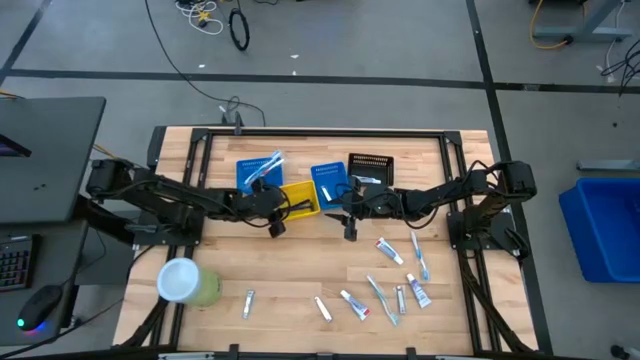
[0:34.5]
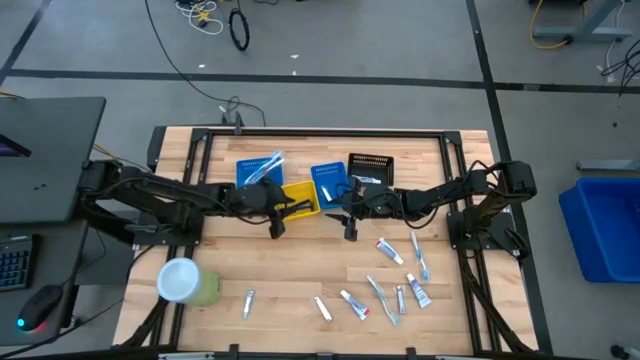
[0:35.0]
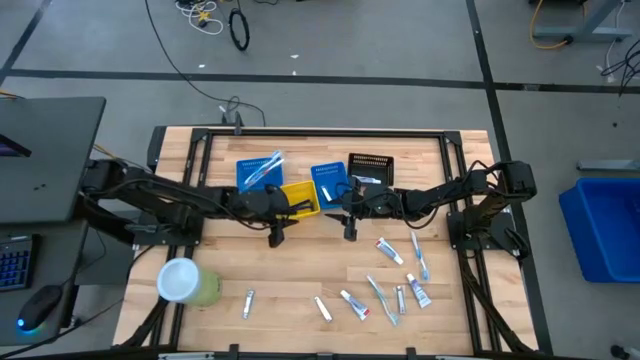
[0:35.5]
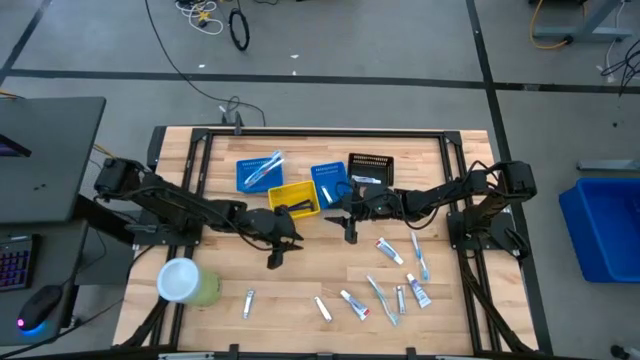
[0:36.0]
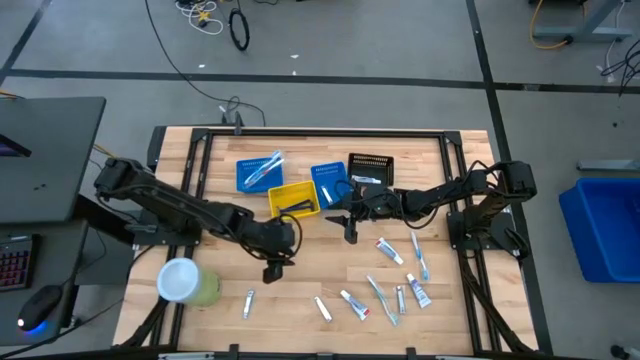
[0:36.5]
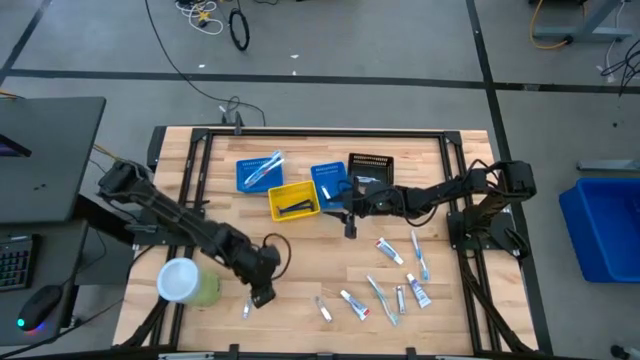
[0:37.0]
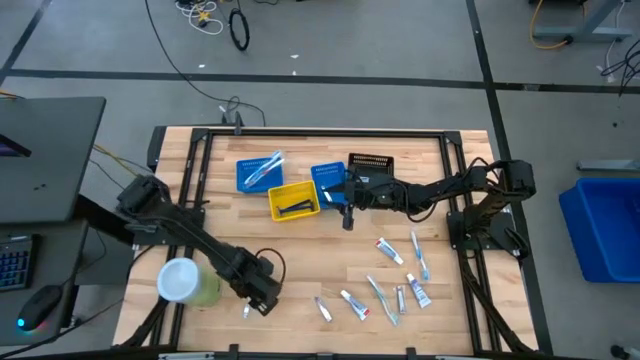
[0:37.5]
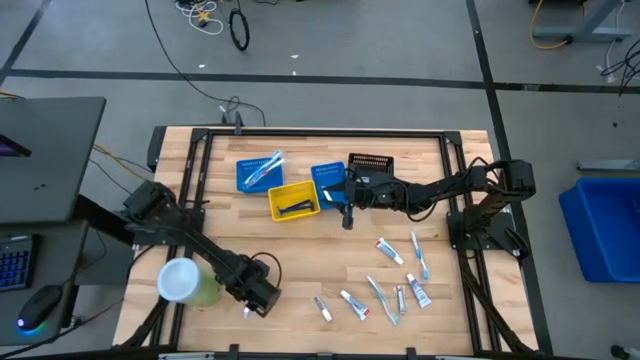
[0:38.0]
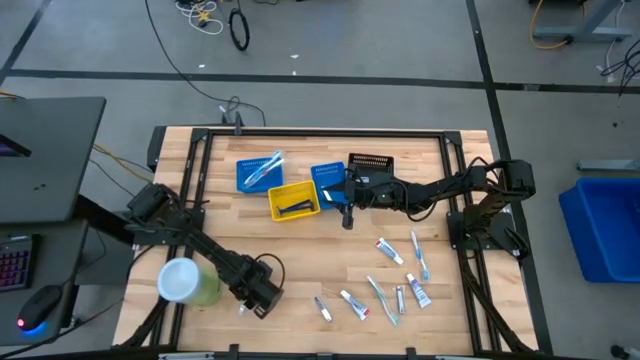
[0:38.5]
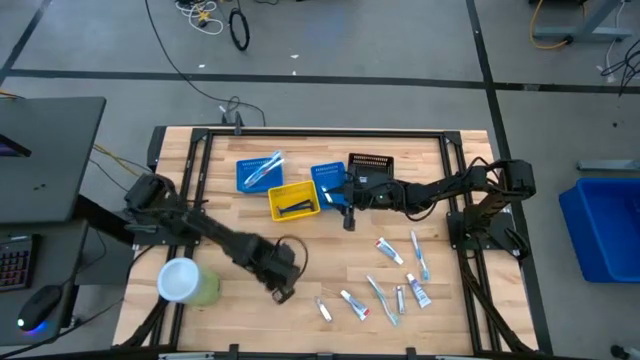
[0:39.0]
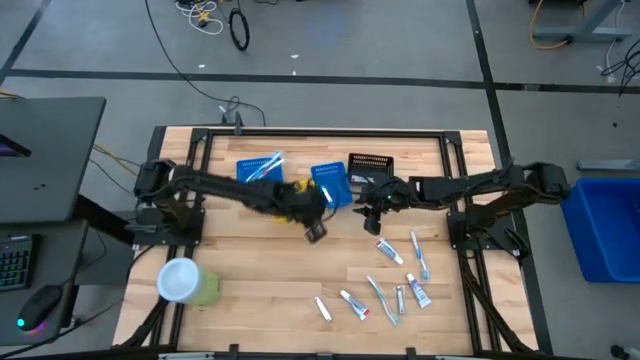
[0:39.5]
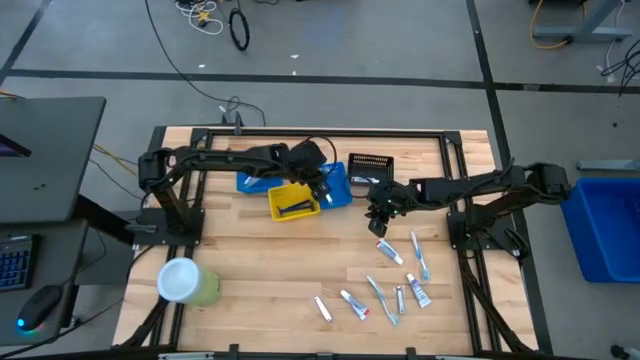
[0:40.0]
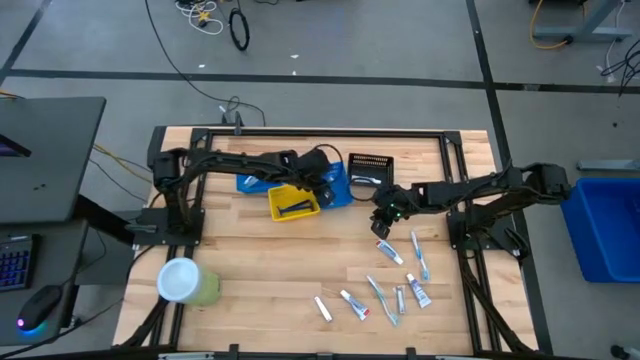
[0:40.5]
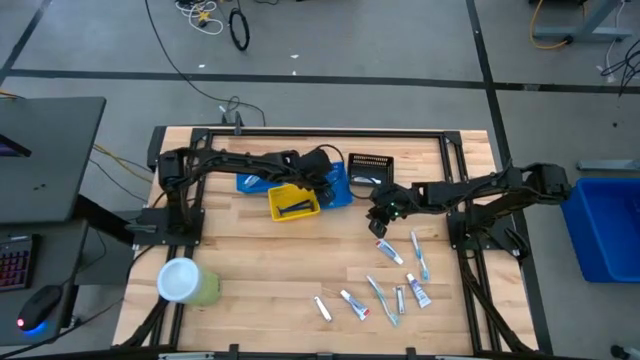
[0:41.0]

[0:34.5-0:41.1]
Task: Pick & Place Travel size toiletries
Put the nail cutter into the right blue bin

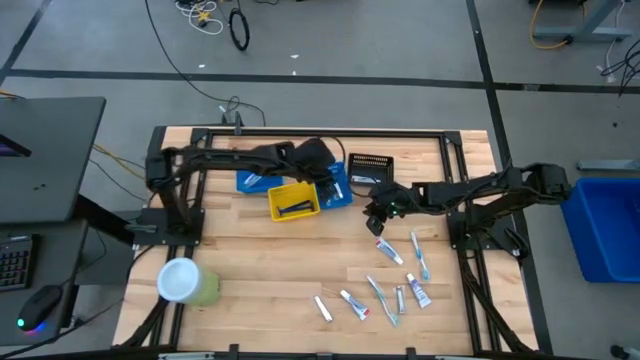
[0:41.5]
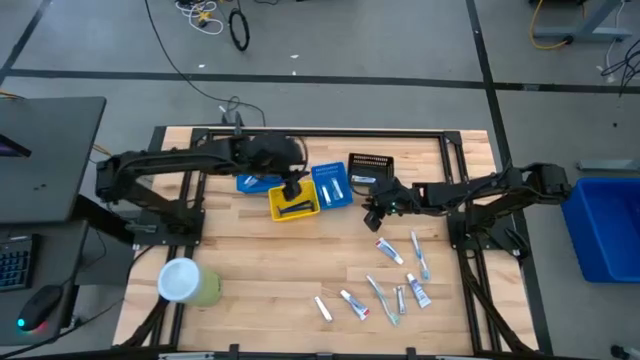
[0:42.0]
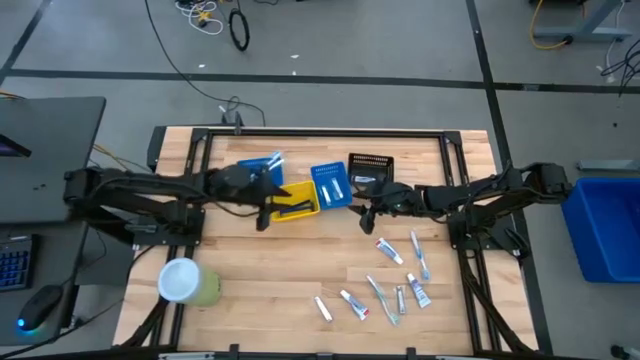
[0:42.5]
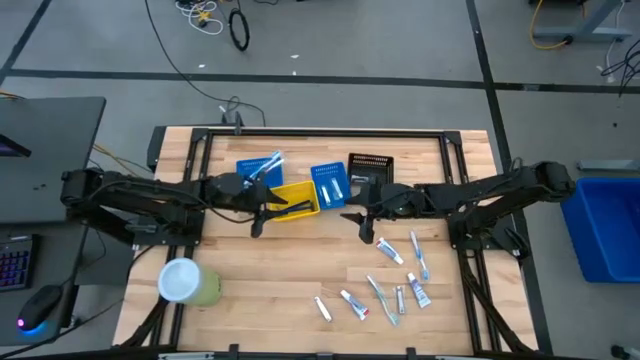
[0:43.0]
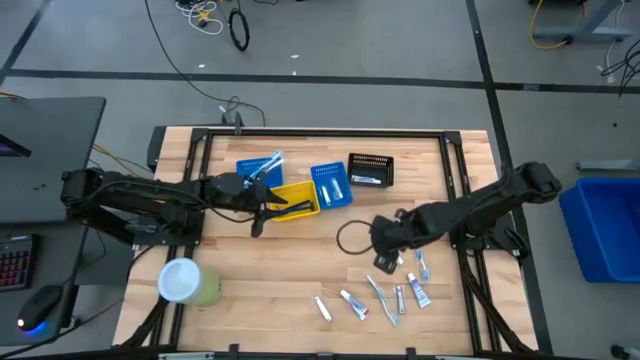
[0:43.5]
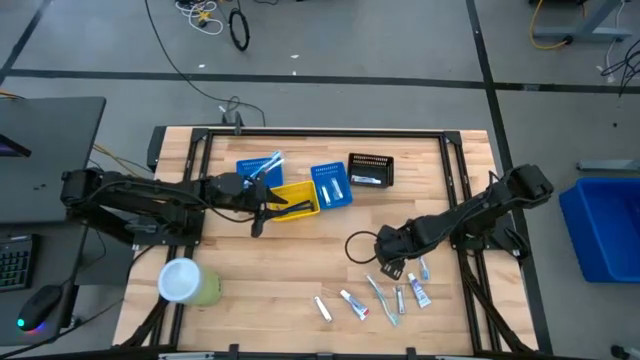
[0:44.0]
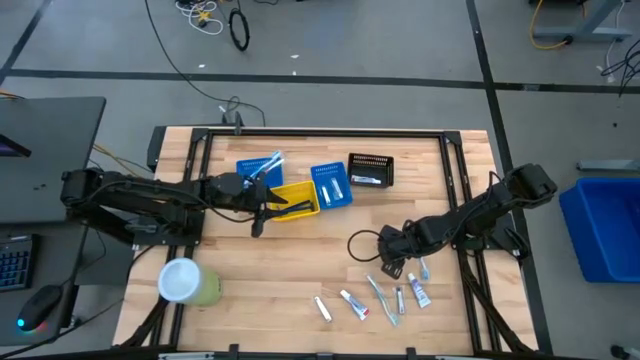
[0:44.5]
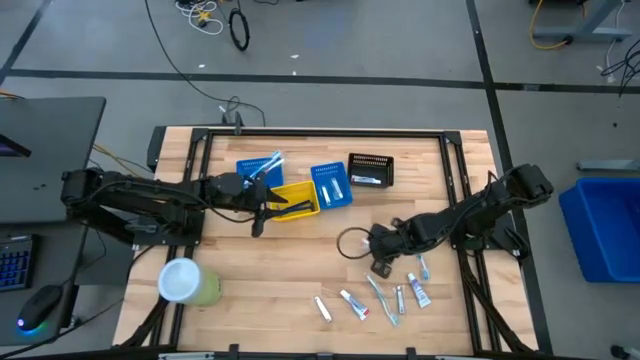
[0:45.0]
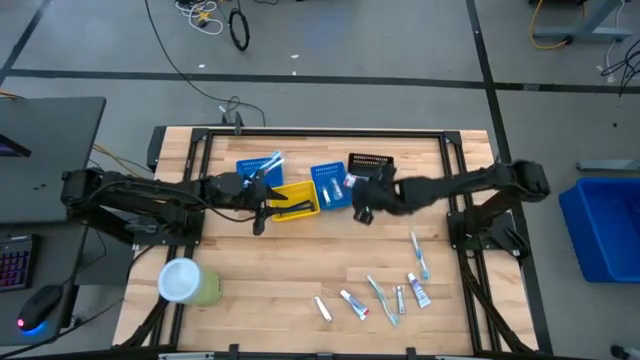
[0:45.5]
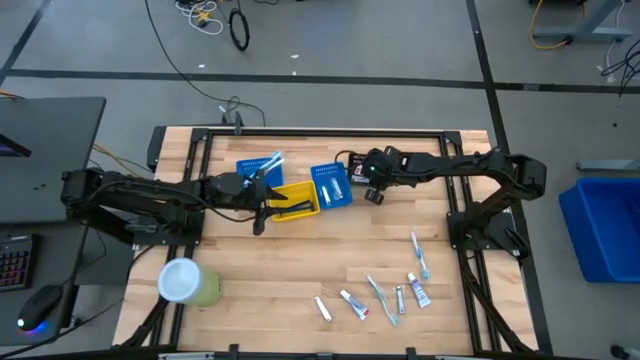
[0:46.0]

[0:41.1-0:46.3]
Put the toothpaste into the black bin

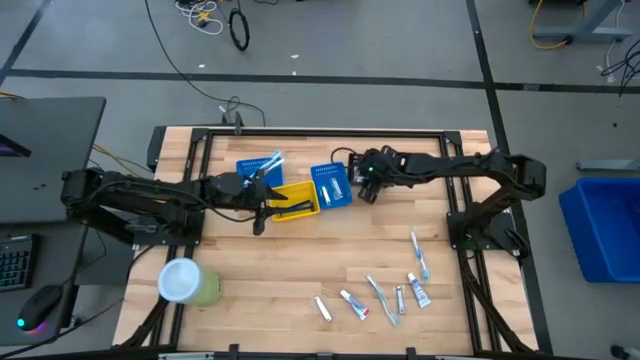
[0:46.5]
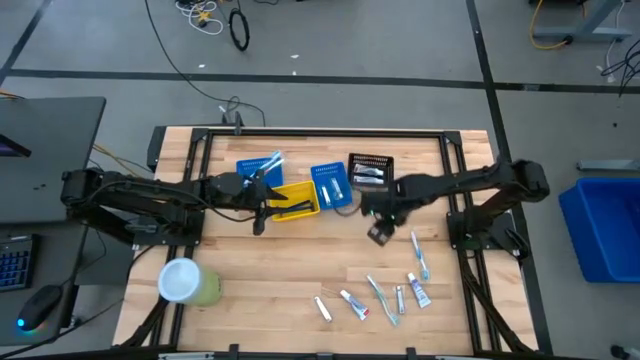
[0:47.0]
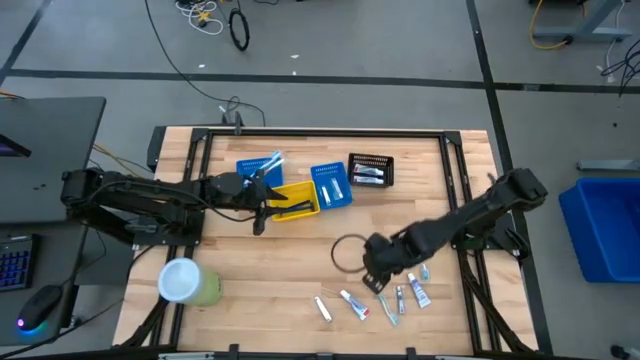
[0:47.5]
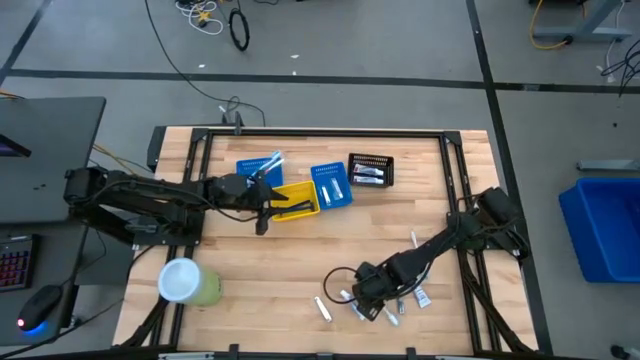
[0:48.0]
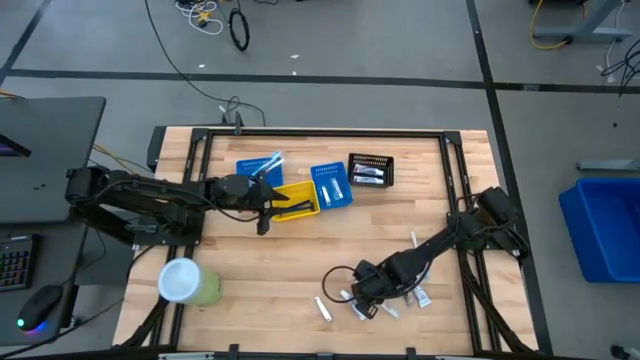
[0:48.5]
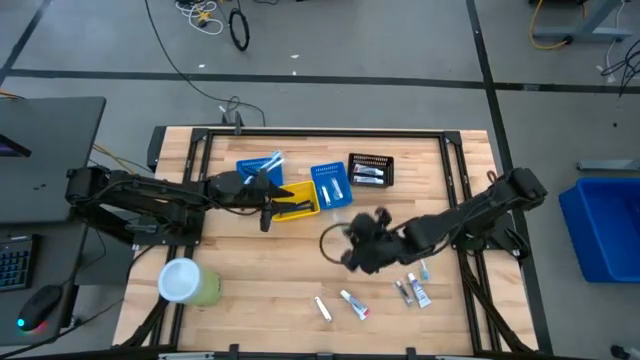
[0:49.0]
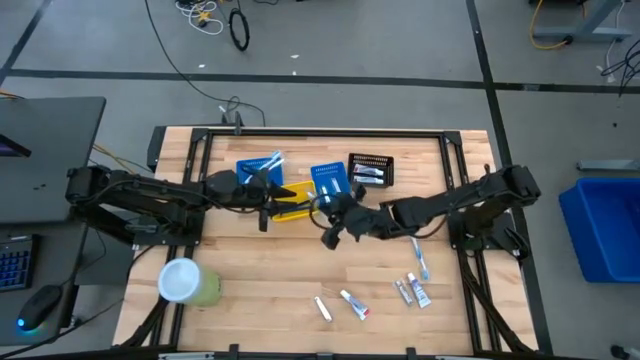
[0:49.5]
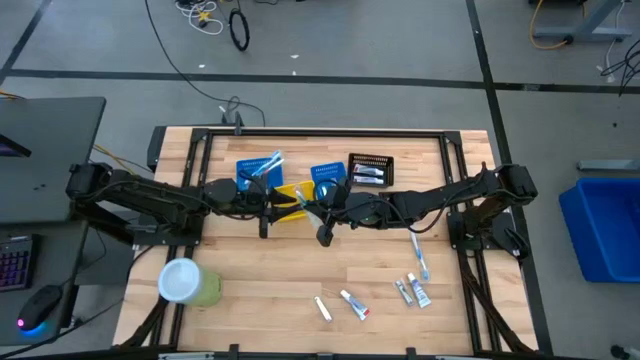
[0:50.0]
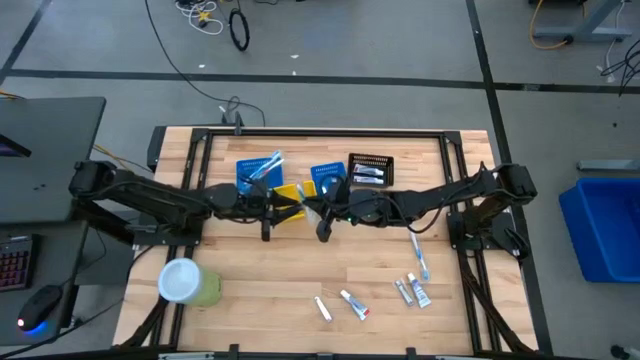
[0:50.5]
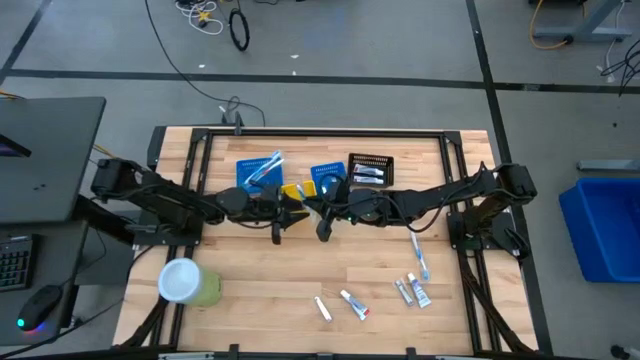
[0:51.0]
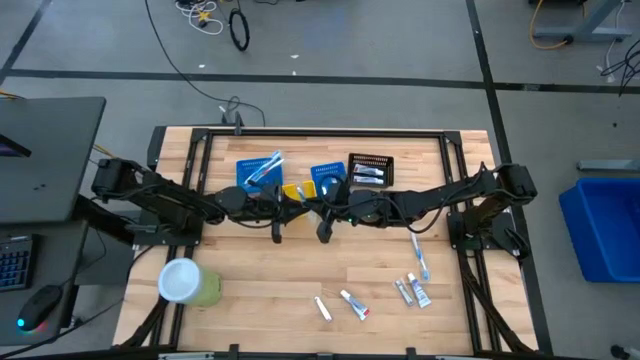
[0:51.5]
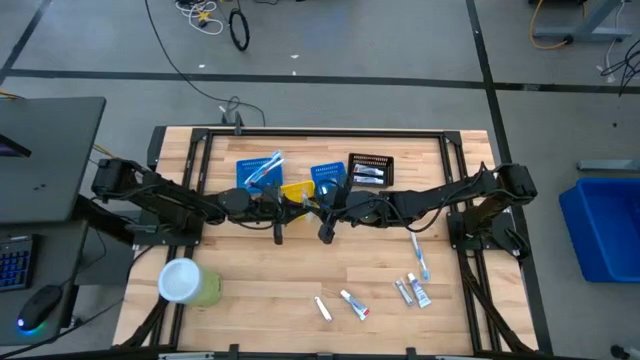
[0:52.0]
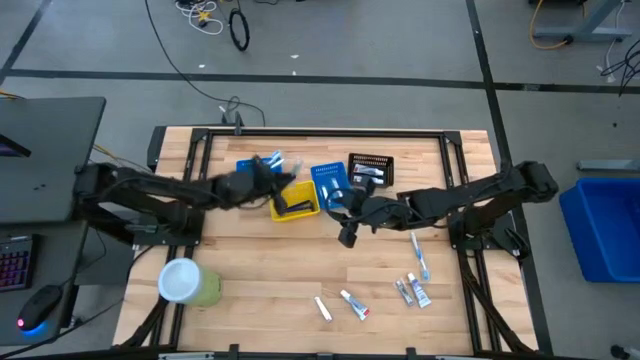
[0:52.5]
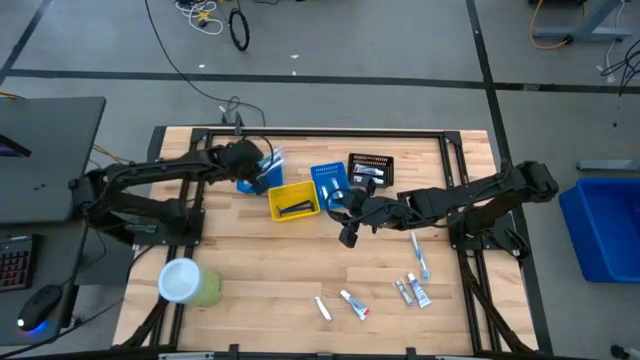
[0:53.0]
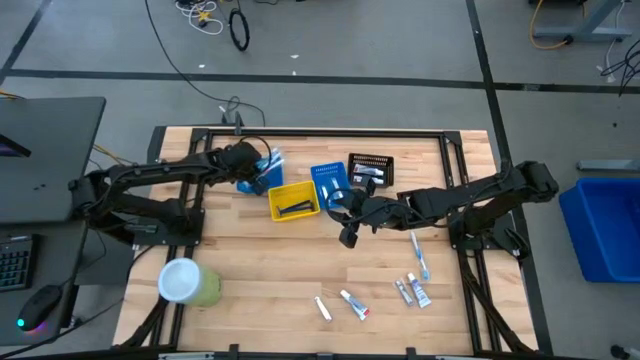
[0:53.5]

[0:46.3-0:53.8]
Put the green toothbrush into the left blue bin

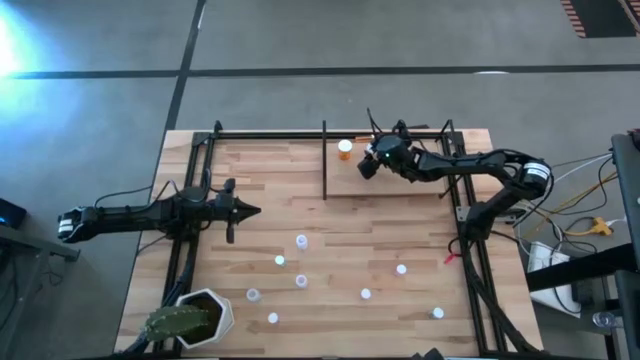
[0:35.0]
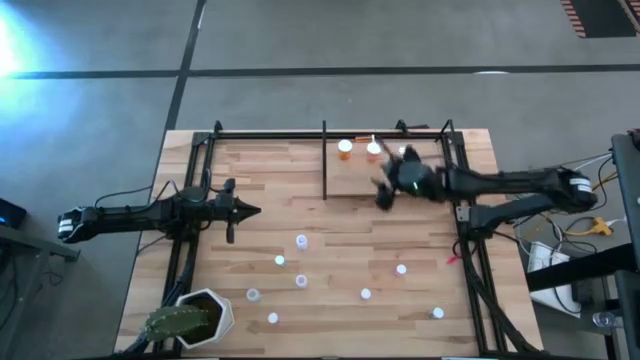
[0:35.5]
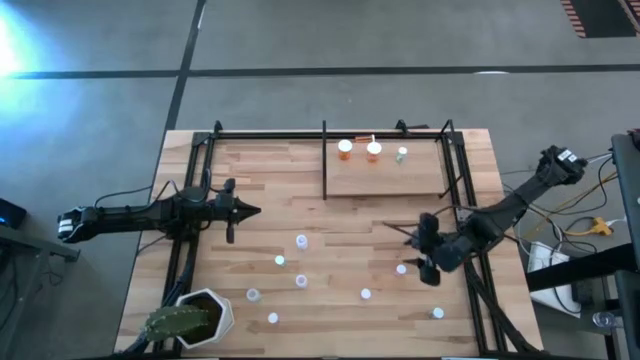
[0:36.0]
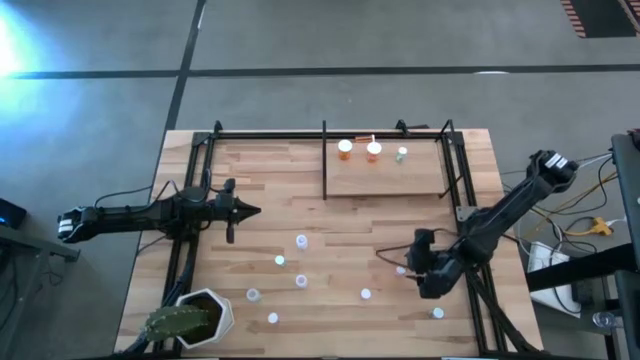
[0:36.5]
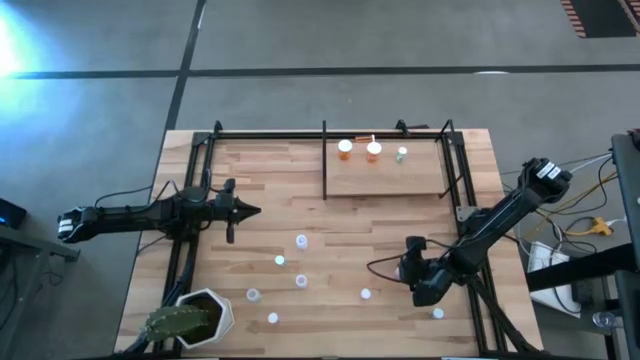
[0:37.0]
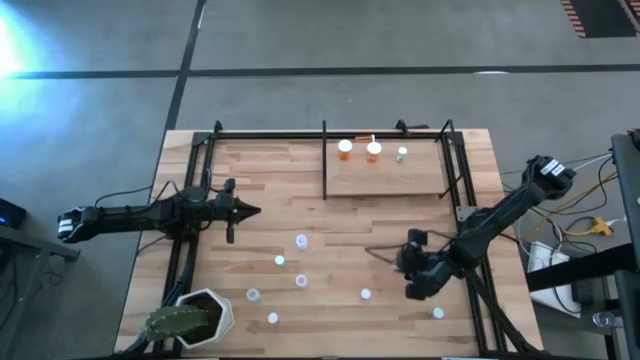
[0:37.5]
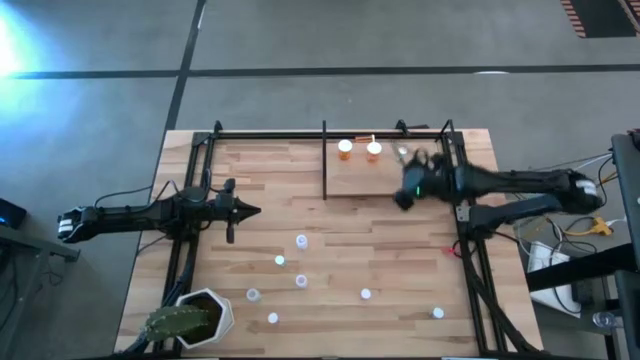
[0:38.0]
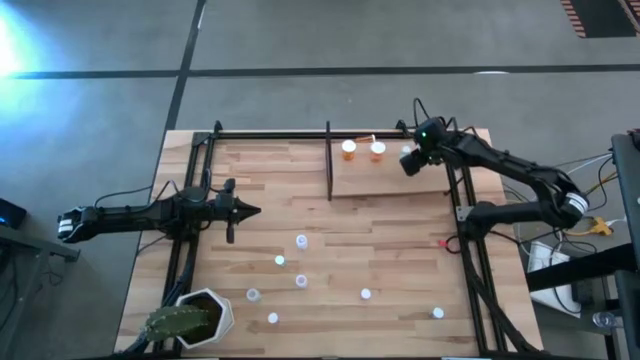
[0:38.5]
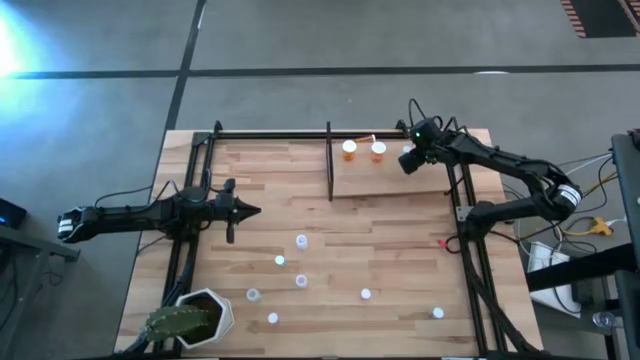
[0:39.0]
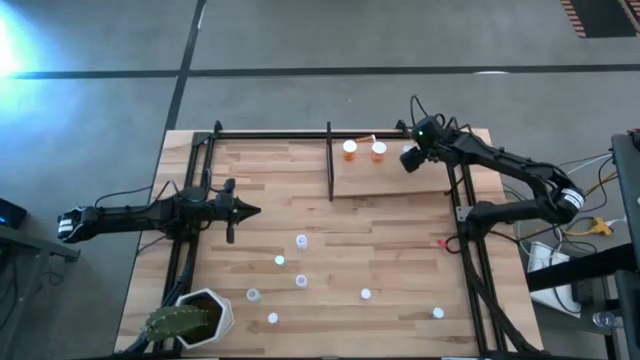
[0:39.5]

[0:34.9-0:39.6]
Task: Pick and place medicine bottles onto shelf by color
Put the top pink pill bottle on the shelf
